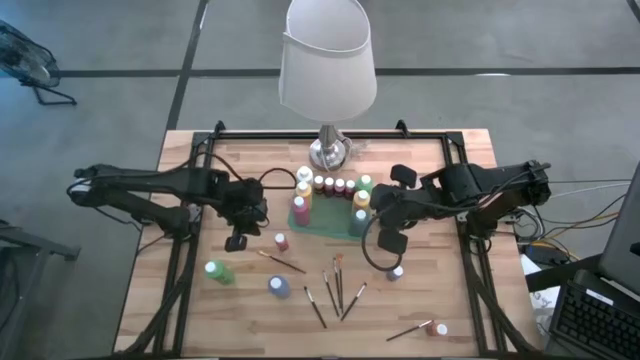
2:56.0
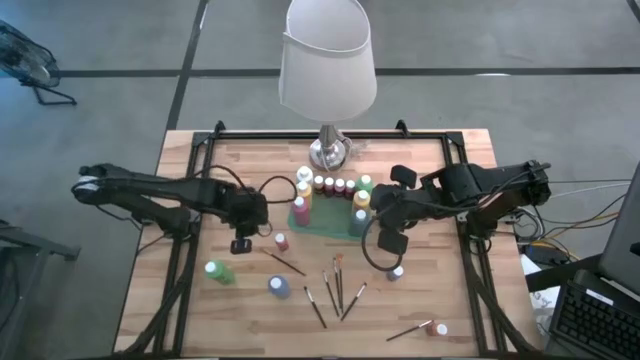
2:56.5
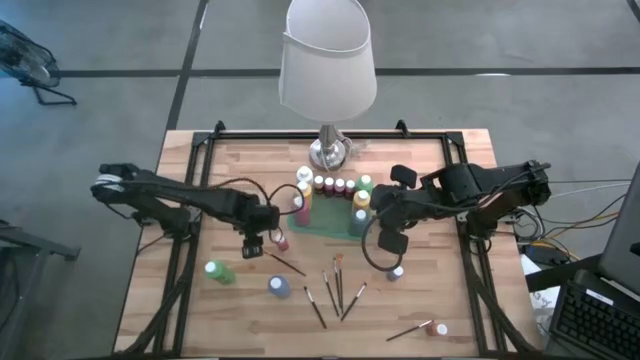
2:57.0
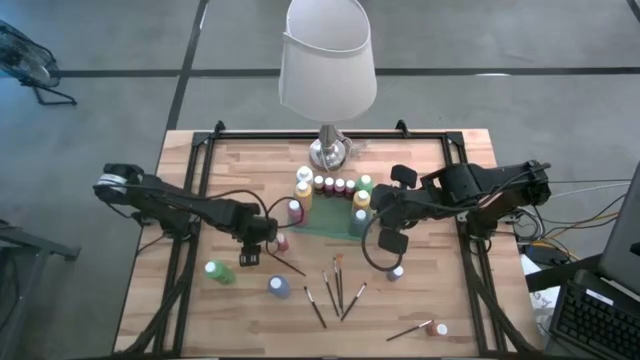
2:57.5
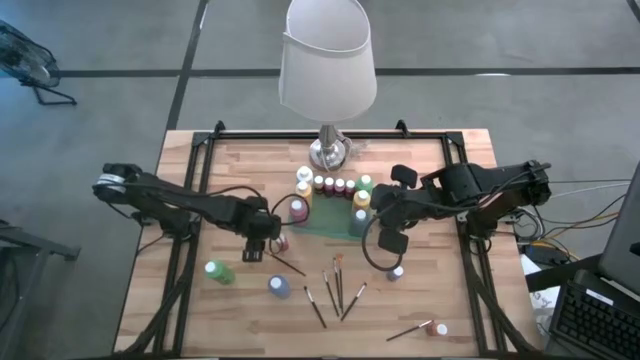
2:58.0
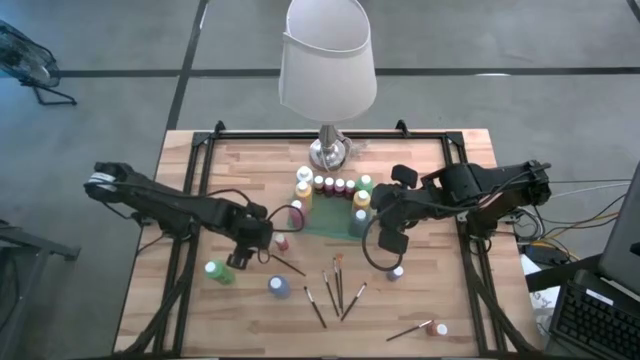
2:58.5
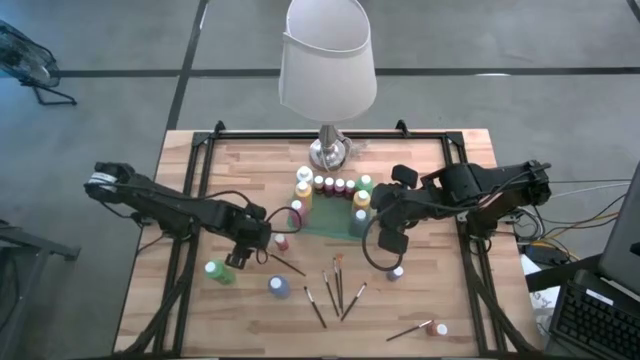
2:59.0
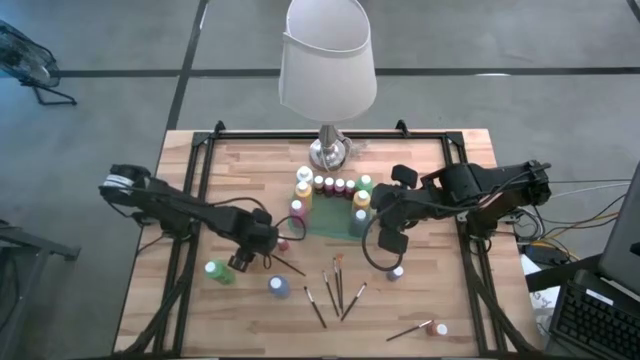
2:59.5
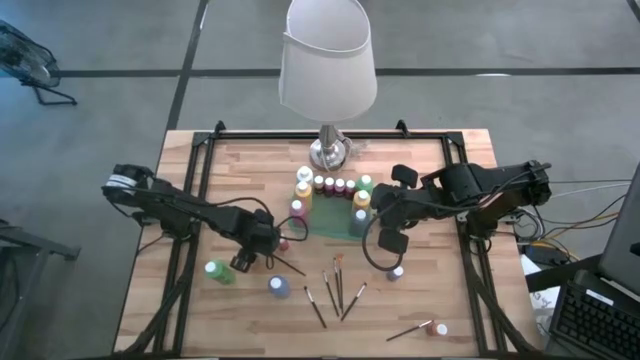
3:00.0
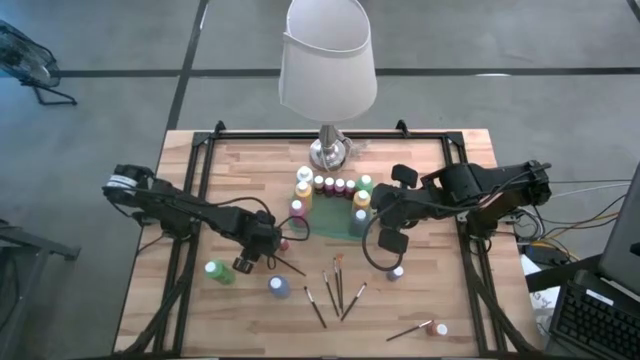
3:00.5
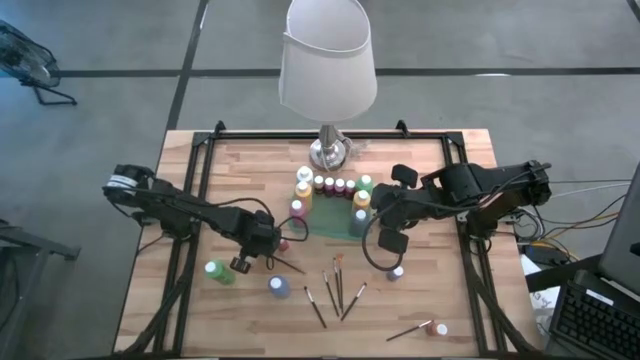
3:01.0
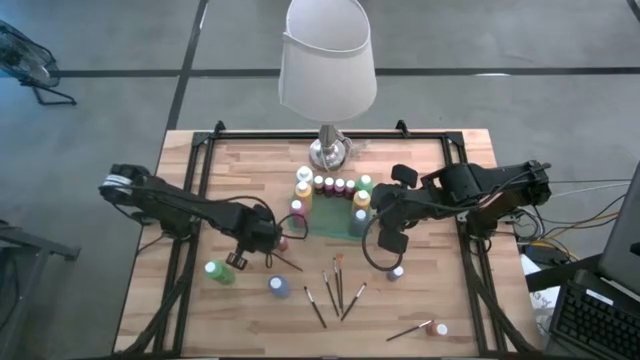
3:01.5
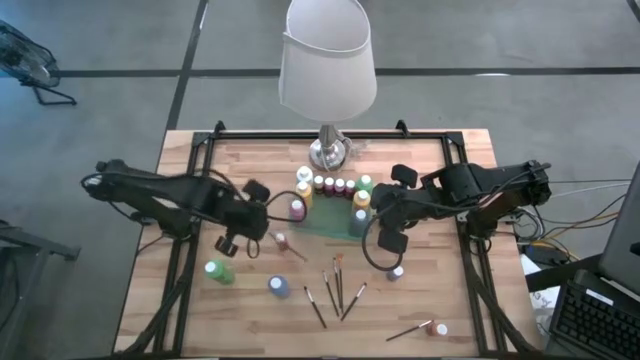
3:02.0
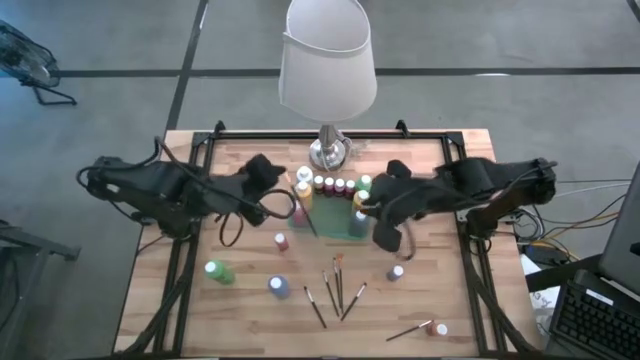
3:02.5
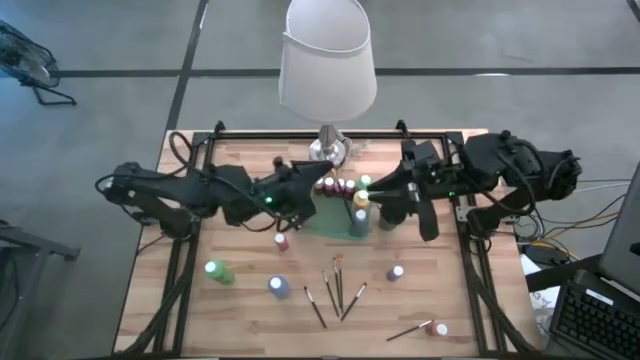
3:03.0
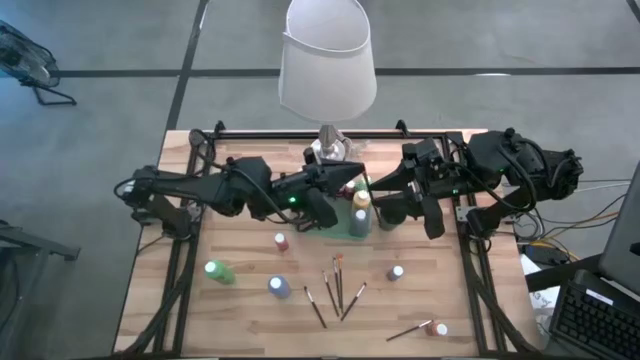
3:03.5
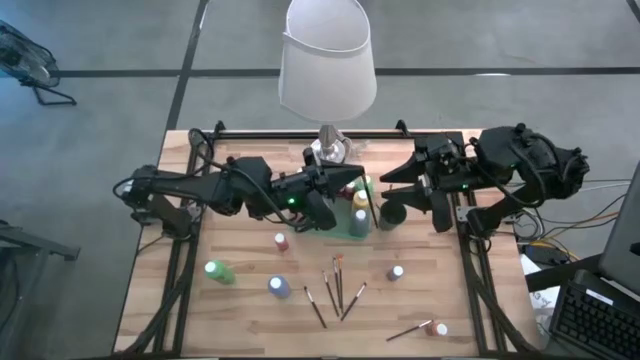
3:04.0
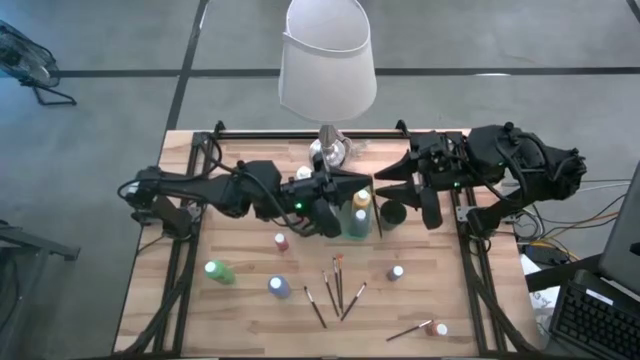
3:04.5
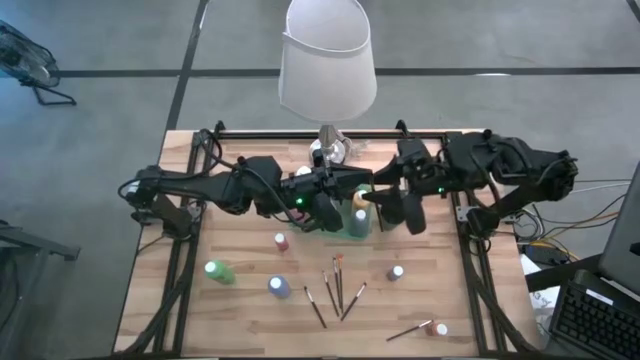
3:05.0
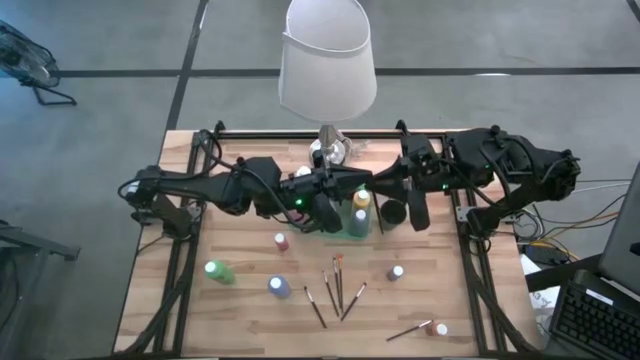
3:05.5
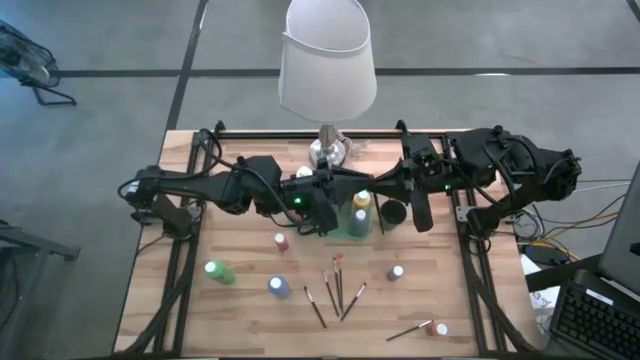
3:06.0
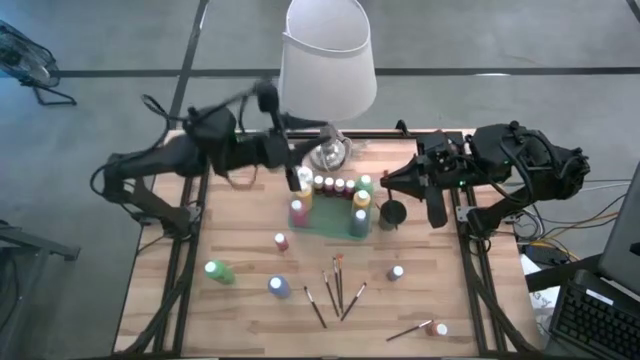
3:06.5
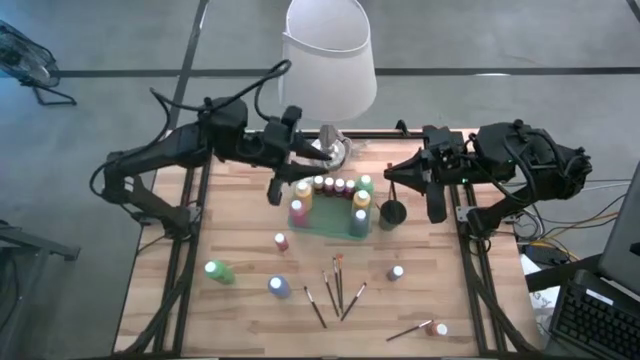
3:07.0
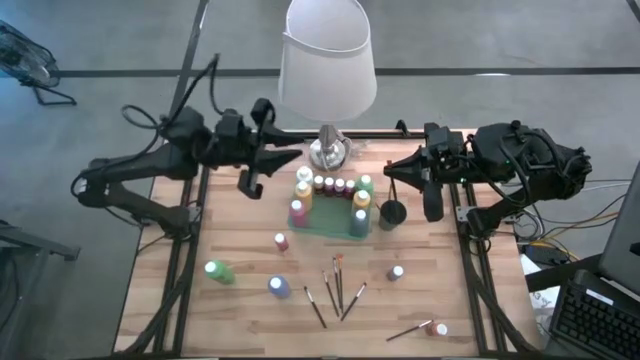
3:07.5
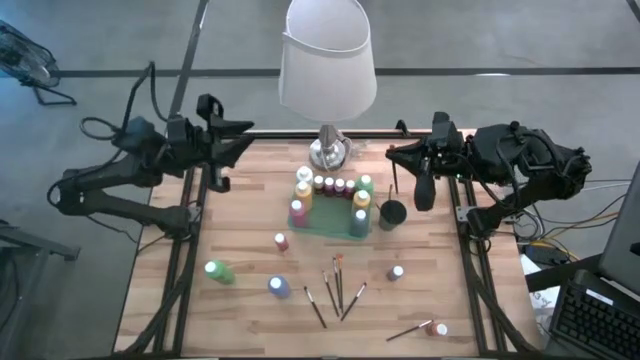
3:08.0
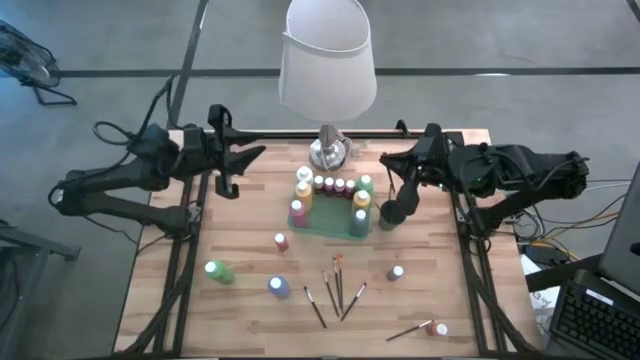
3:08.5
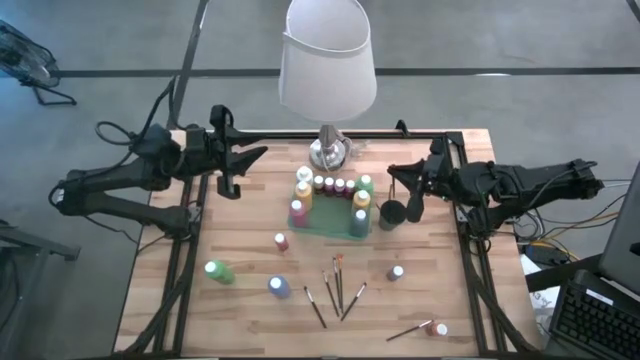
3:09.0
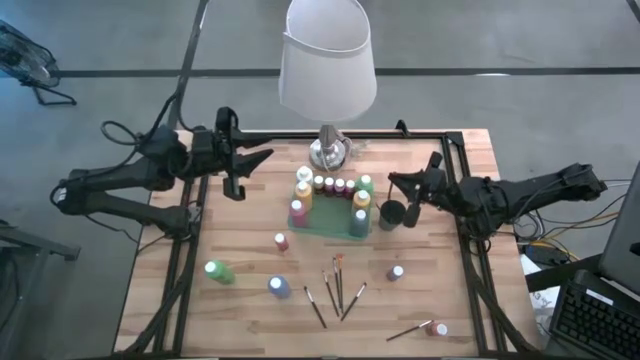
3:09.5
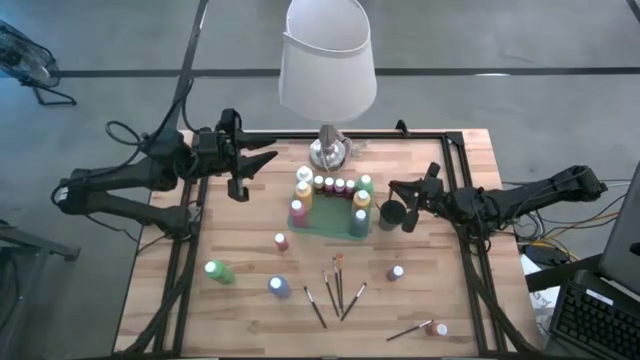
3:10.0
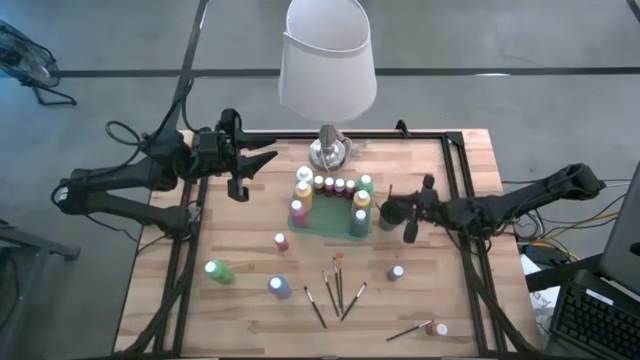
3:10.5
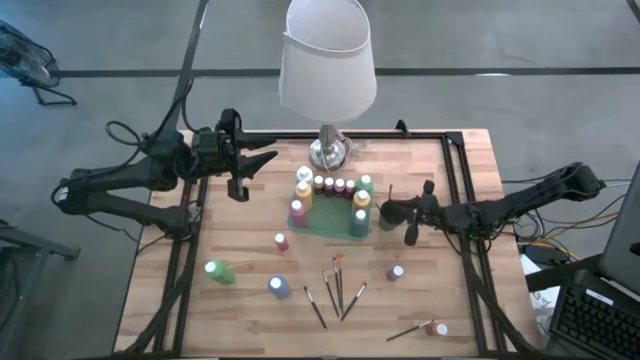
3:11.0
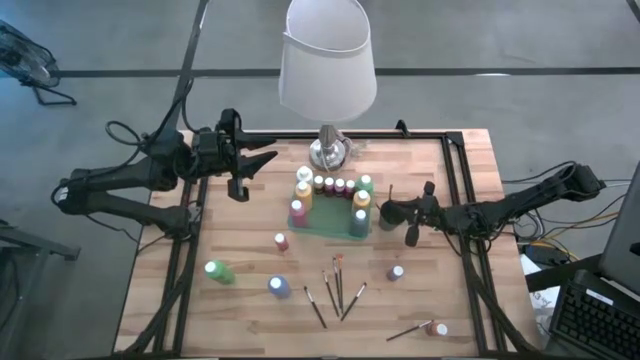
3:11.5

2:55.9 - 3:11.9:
Task: Pick & Place Paint Supplies
Put the orange paint brush into the black cup

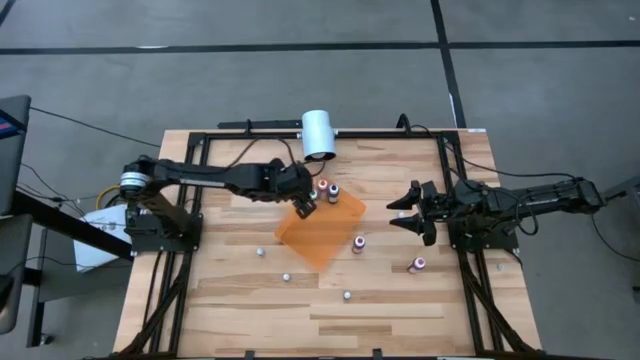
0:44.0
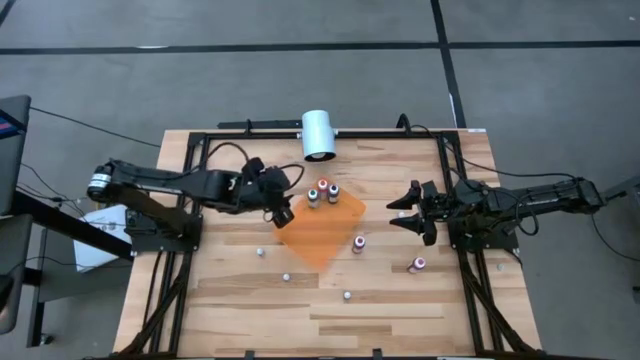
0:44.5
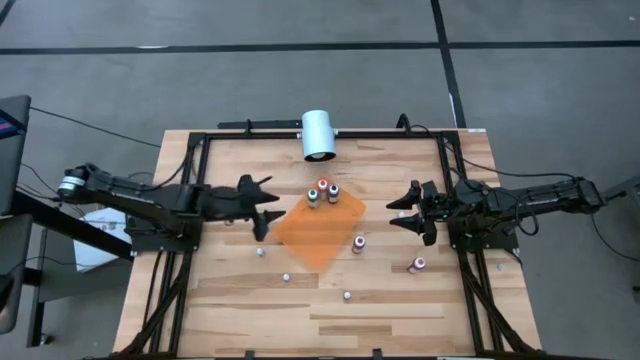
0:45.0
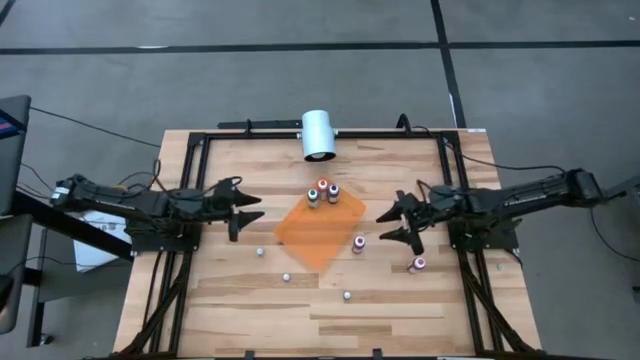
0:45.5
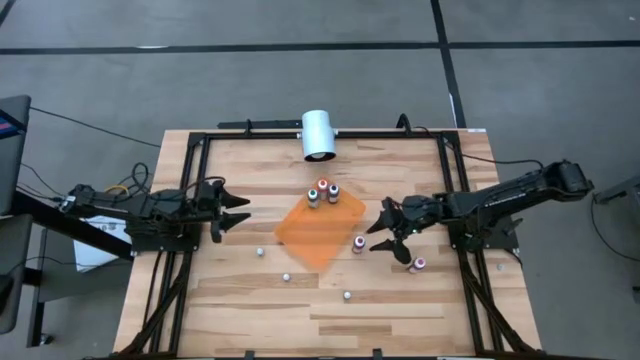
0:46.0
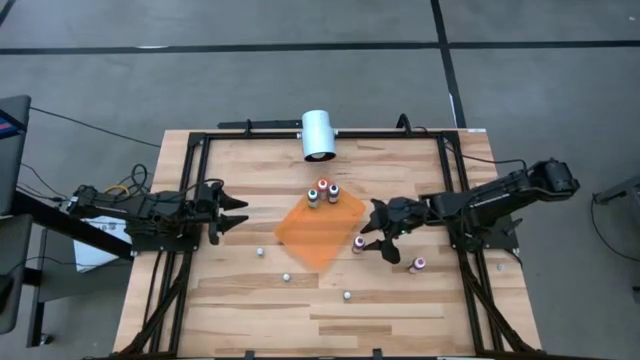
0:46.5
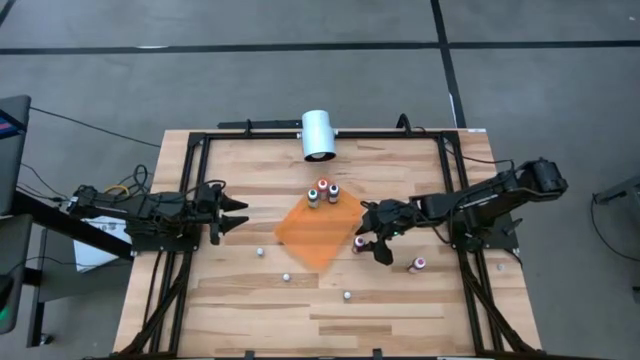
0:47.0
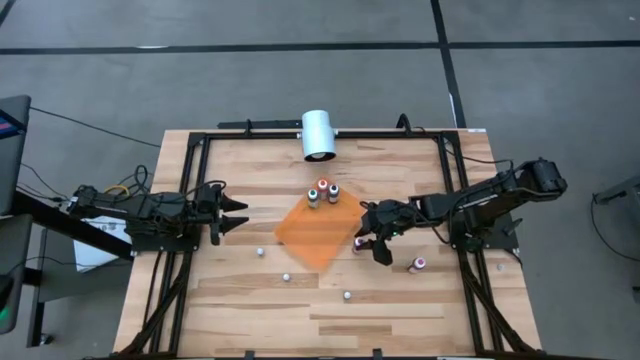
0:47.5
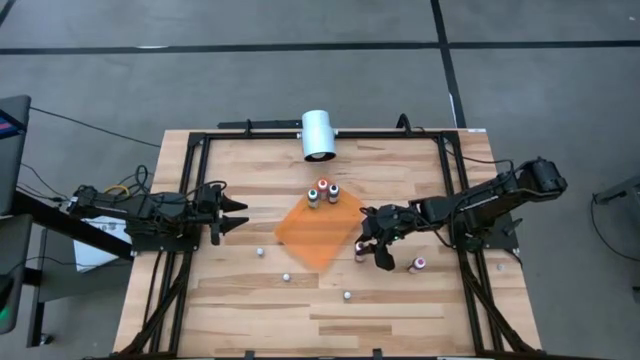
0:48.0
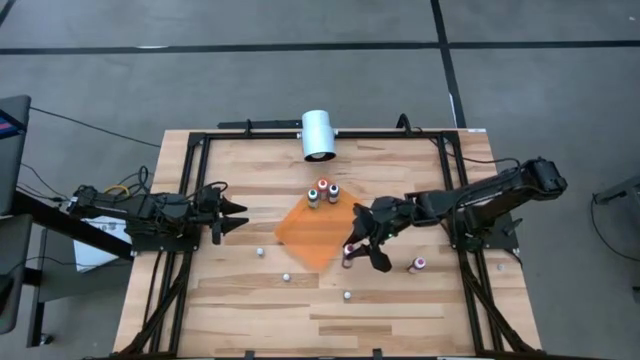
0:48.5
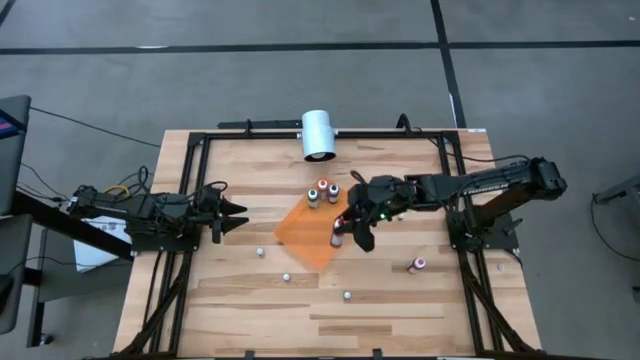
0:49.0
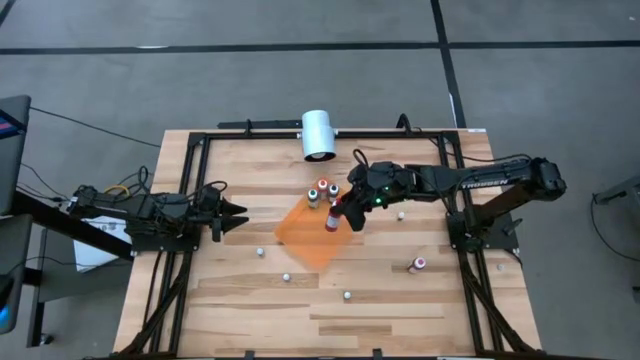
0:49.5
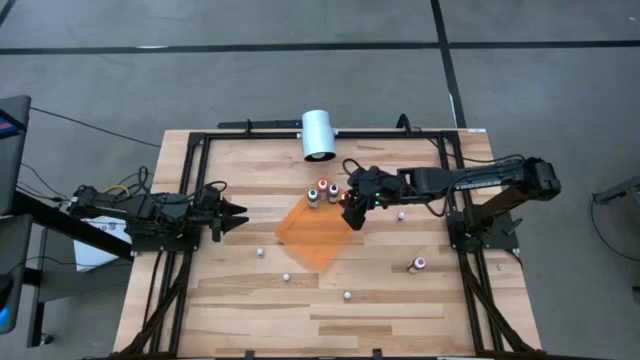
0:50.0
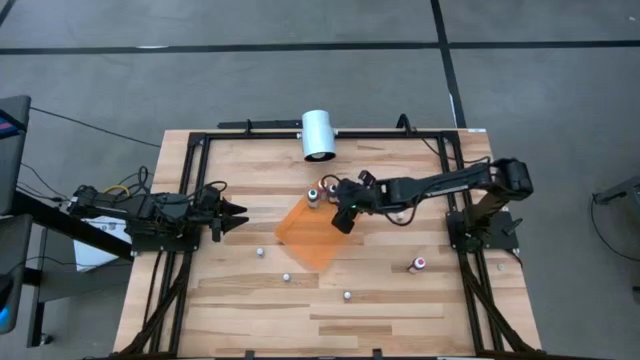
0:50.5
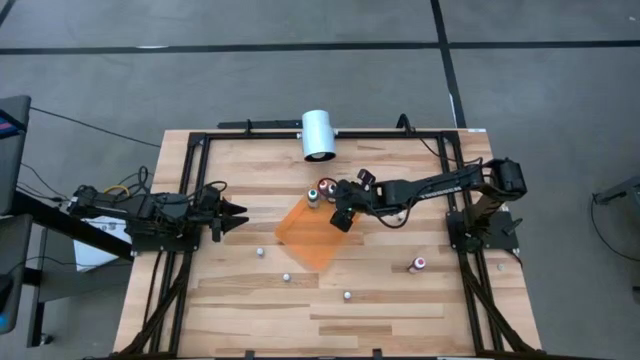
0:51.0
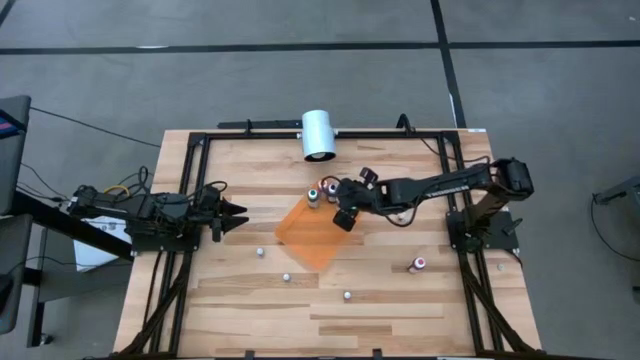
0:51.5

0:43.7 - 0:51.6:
Task: Pick & Place food coloring
Put the big red food coloring bottle into the orange bin
